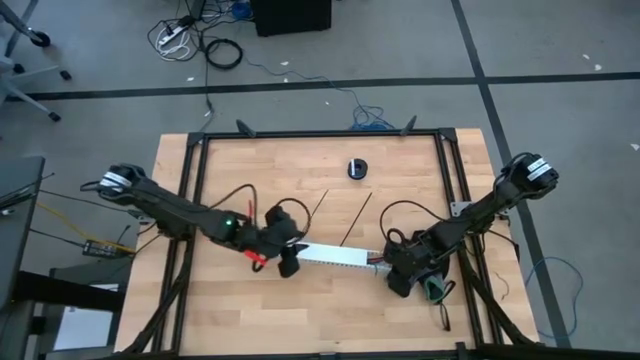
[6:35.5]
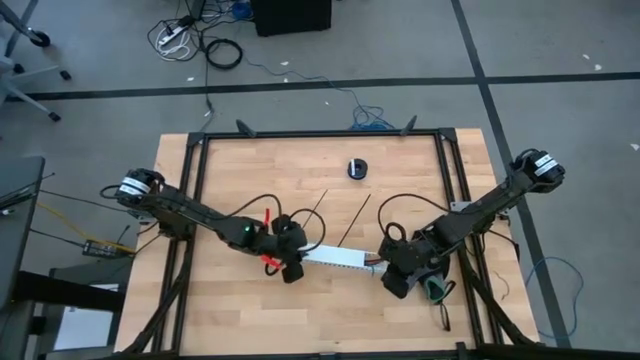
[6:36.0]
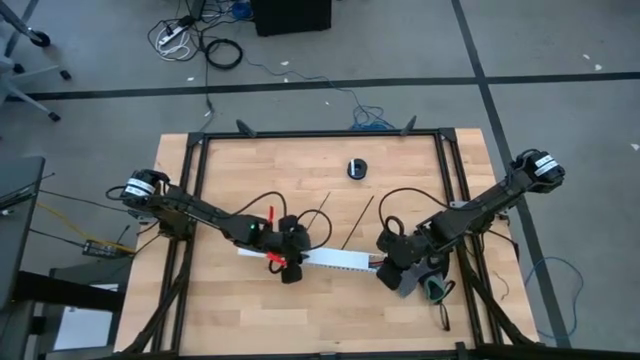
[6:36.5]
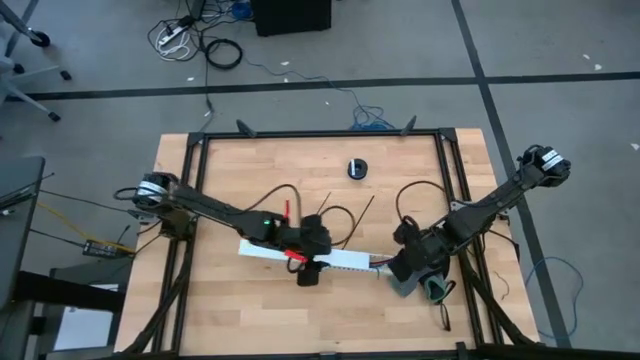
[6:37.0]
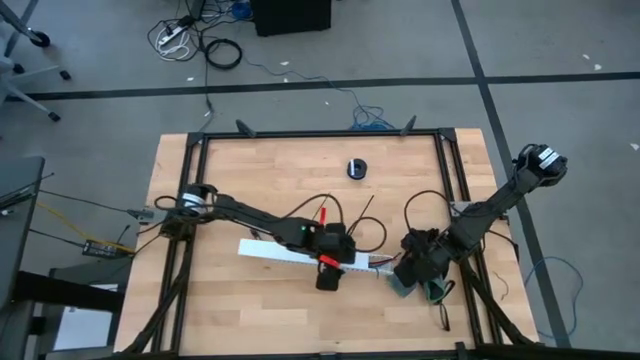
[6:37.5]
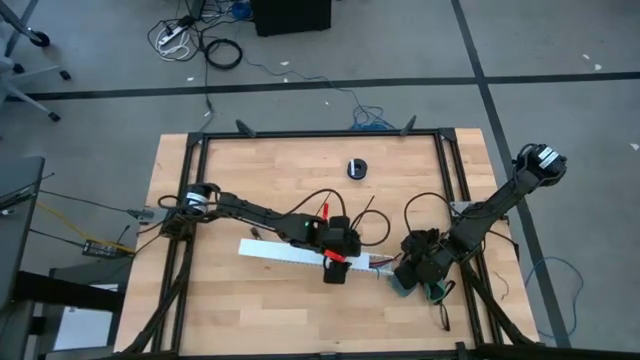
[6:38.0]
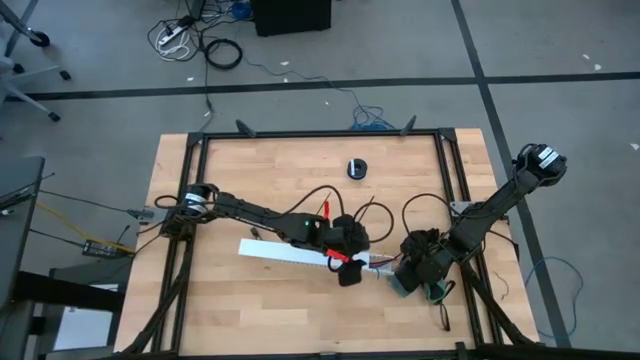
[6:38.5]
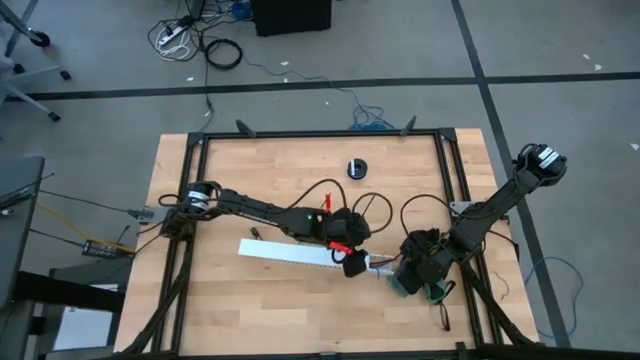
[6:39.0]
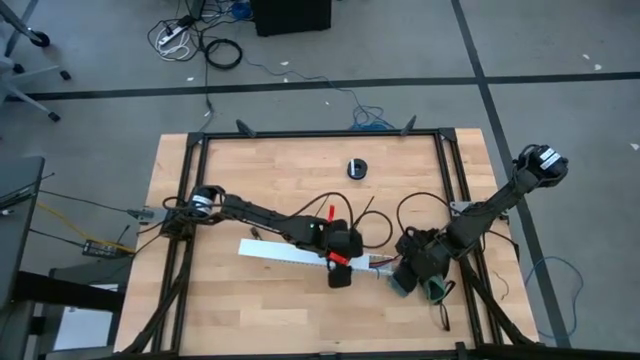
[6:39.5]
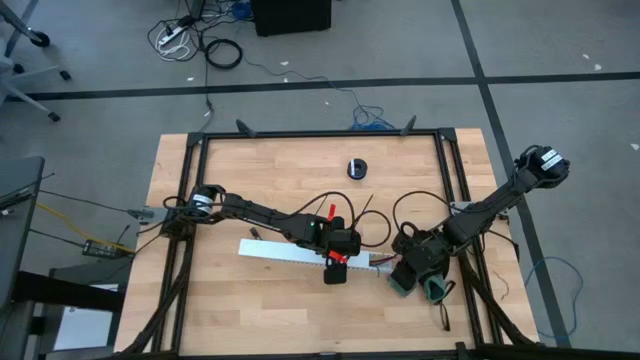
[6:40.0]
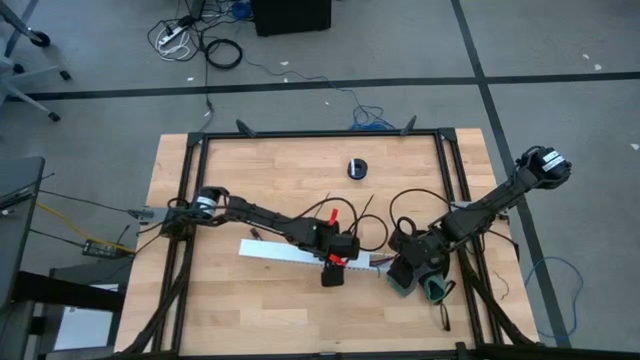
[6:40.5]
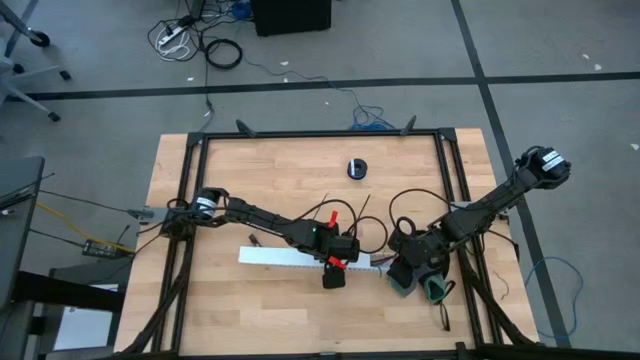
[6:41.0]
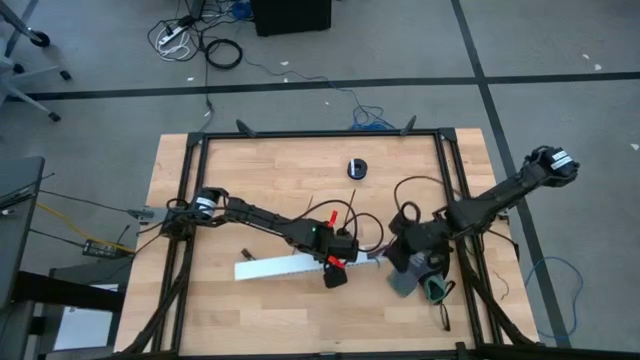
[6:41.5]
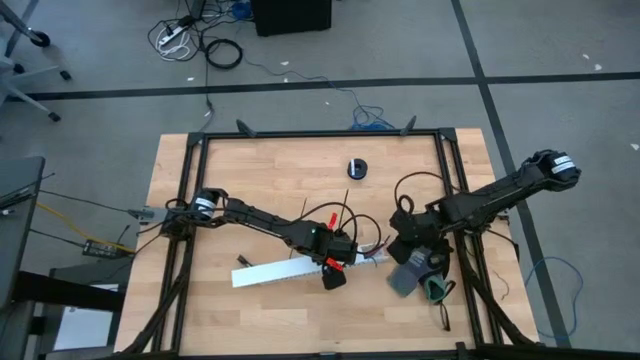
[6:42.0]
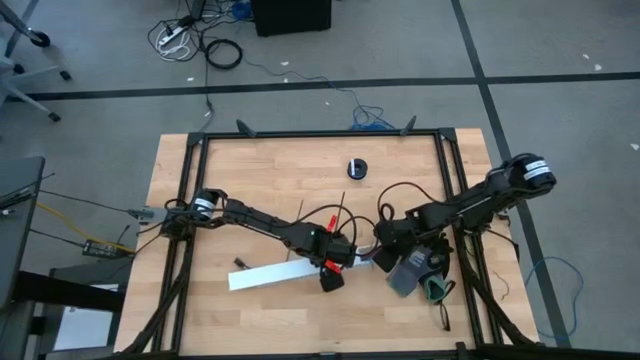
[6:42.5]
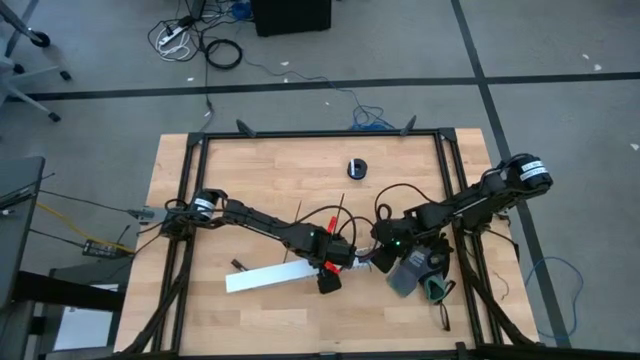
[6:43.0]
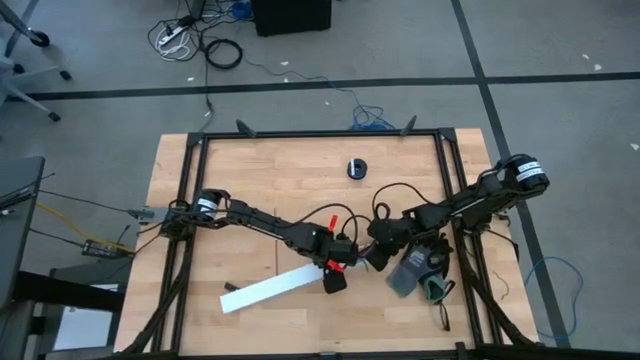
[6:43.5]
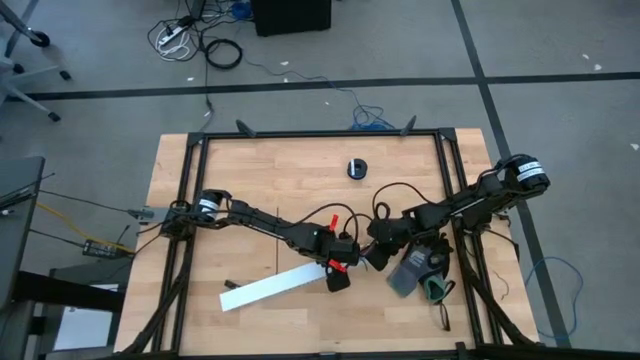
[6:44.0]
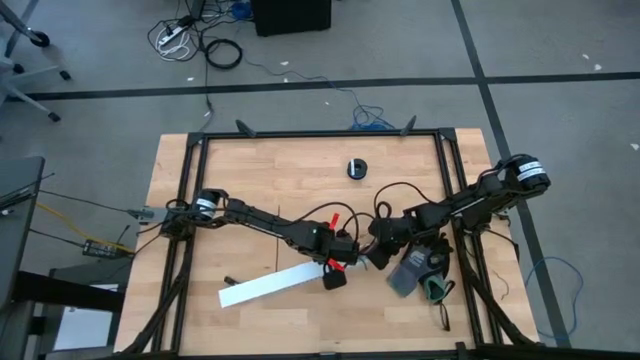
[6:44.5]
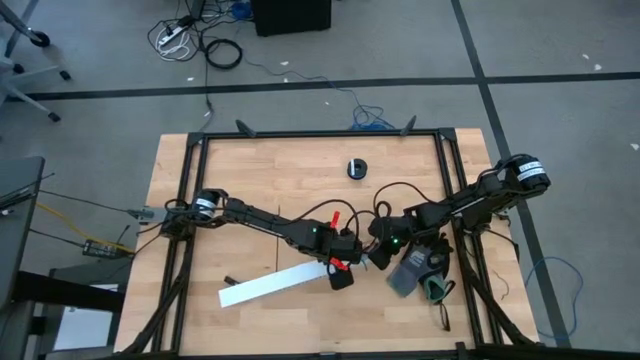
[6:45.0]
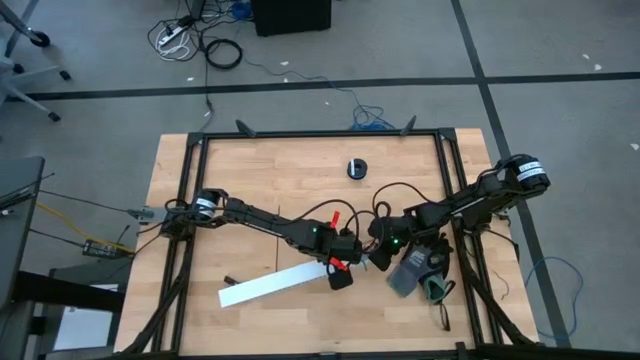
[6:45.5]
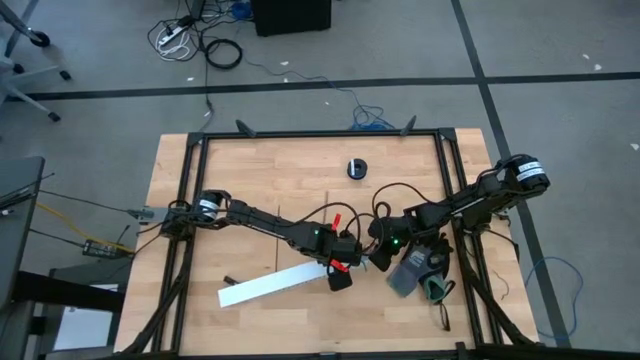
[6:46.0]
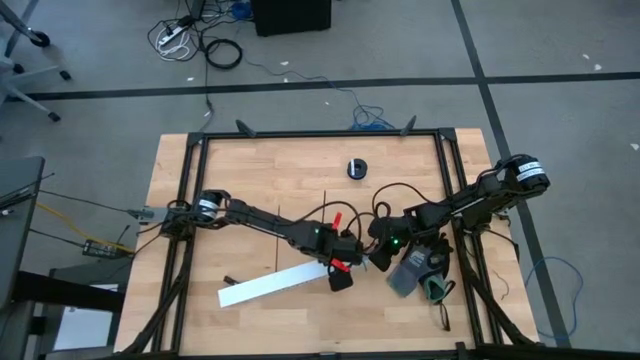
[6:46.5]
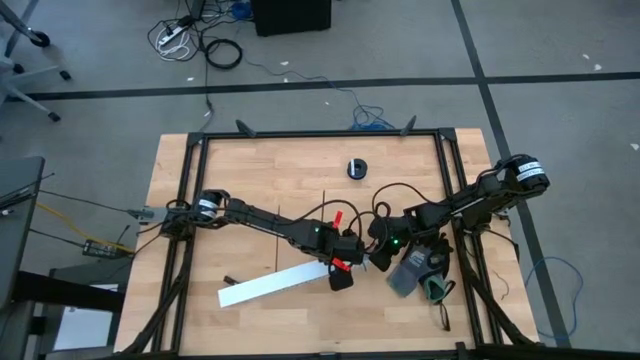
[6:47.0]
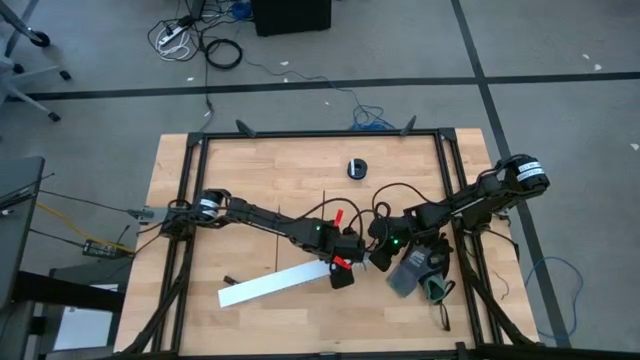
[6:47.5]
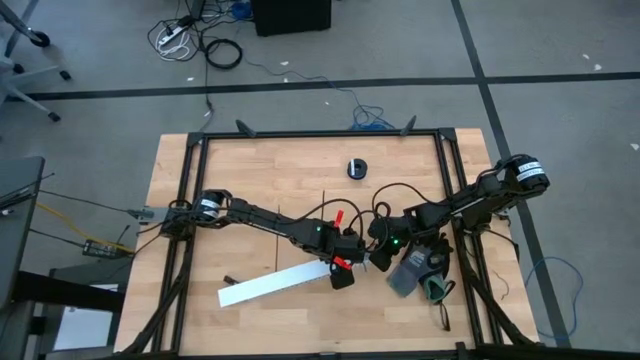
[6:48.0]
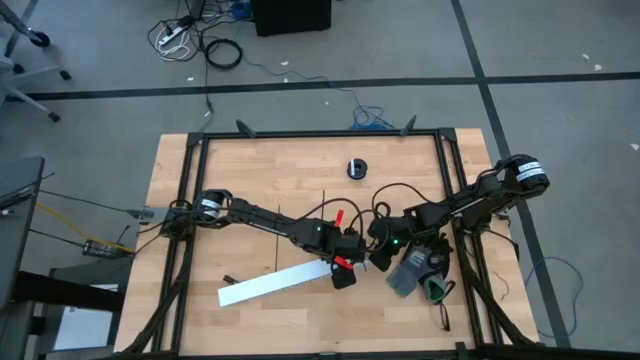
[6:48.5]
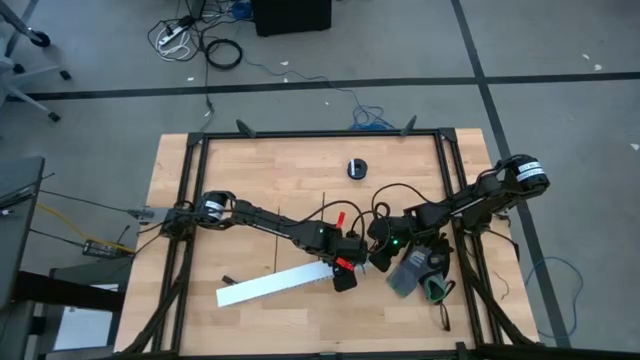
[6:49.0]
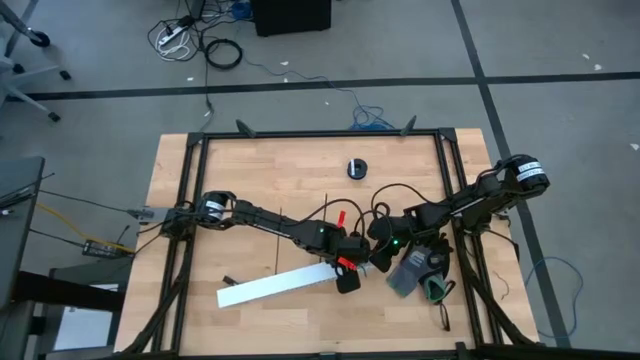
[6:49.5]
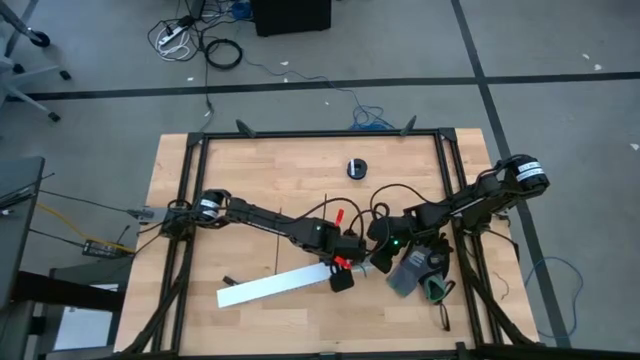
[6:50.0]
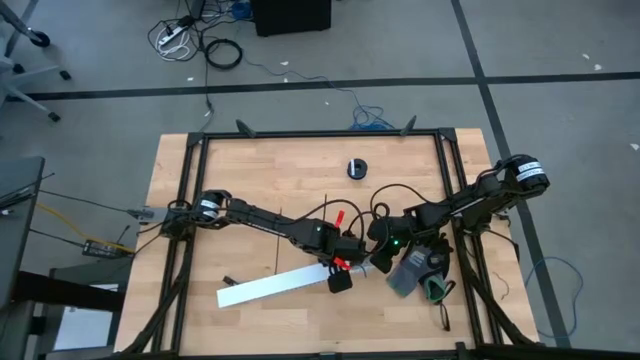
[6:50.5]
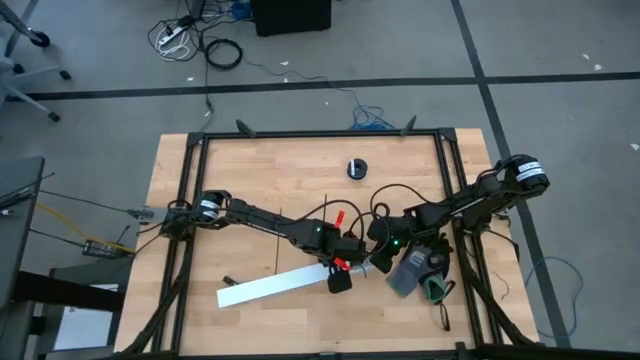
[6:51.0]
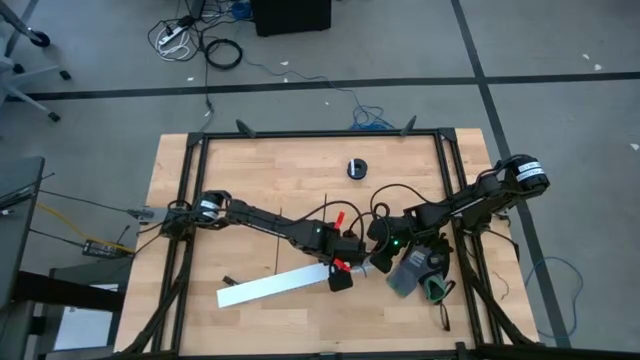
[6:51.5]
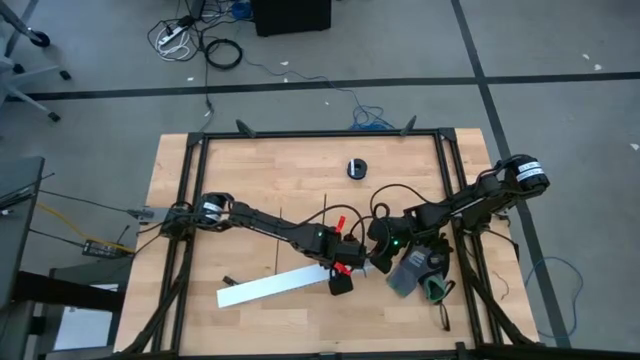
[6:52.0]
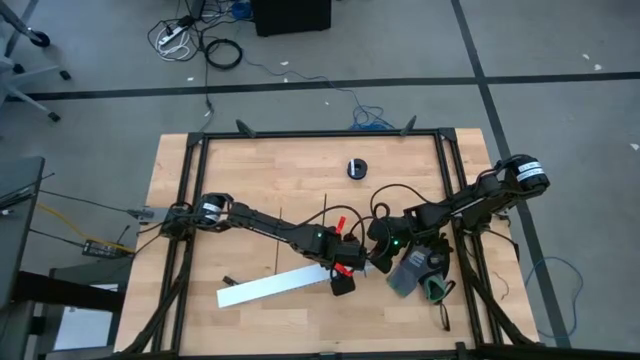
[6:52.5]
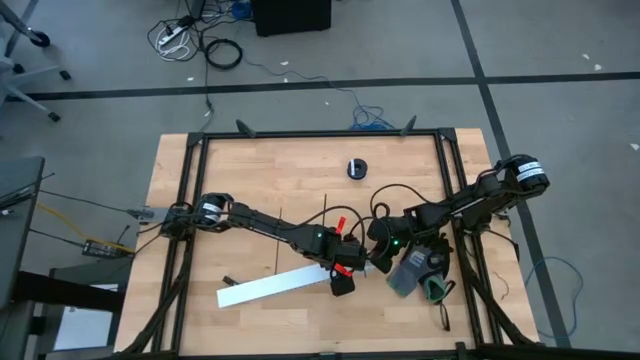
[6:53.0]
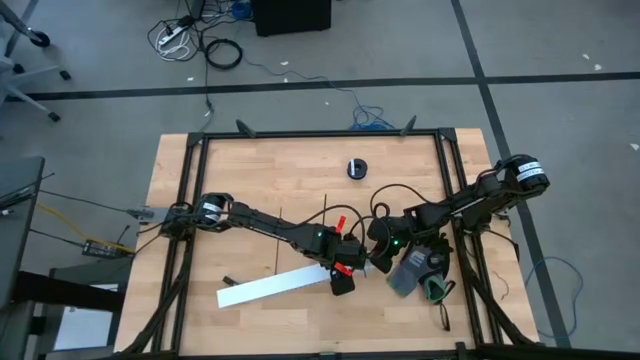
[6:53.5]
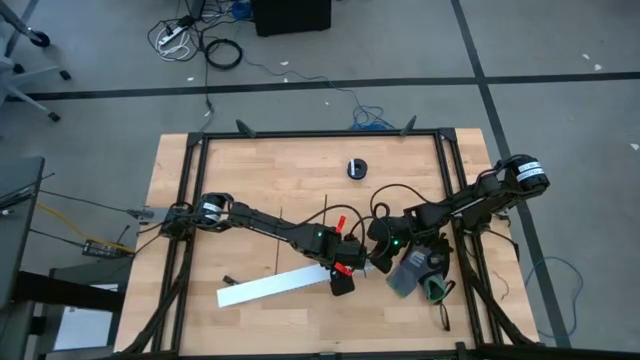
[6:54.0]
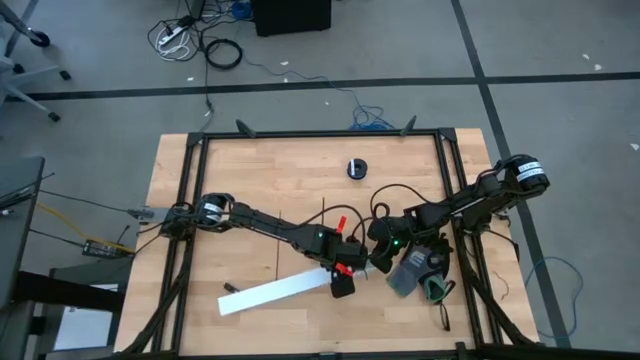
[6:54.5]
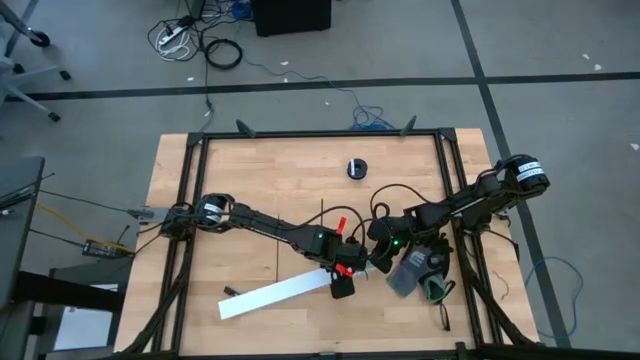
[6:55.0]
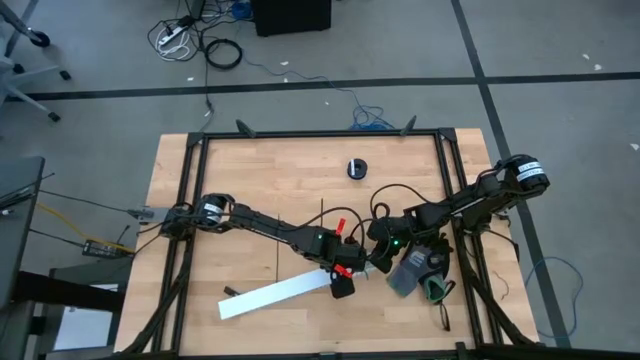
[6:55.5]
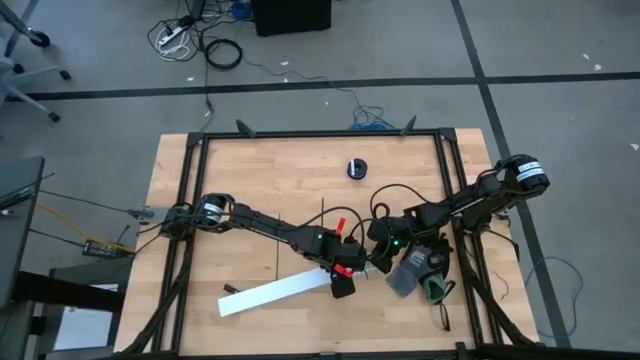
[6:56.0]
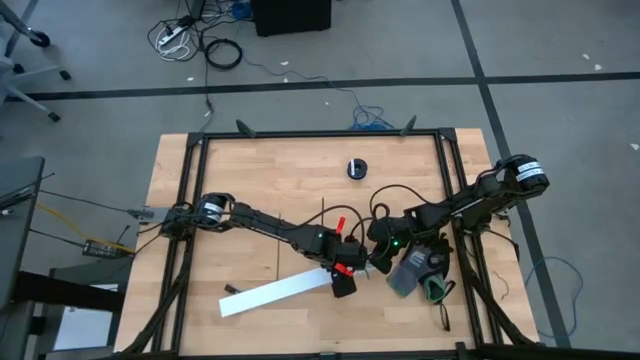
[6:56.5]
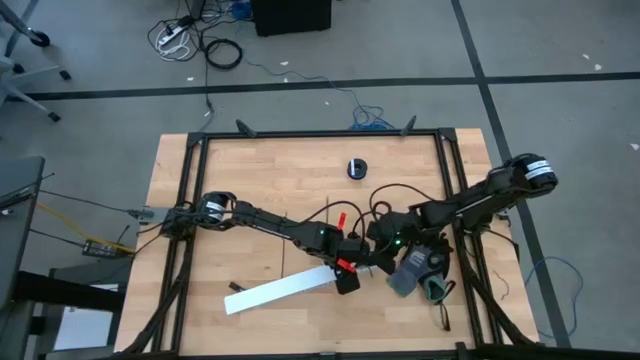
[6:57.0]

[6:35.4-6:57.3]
Task: Ziptie cables
Close the white cable duct
